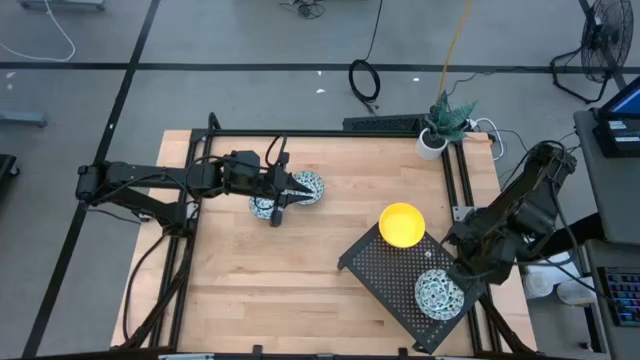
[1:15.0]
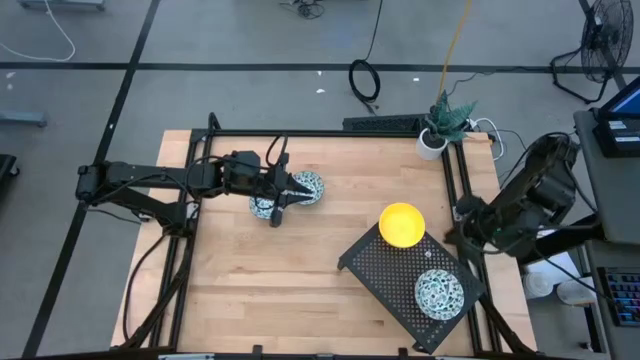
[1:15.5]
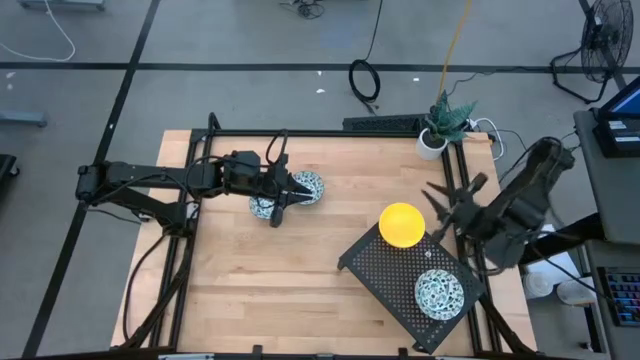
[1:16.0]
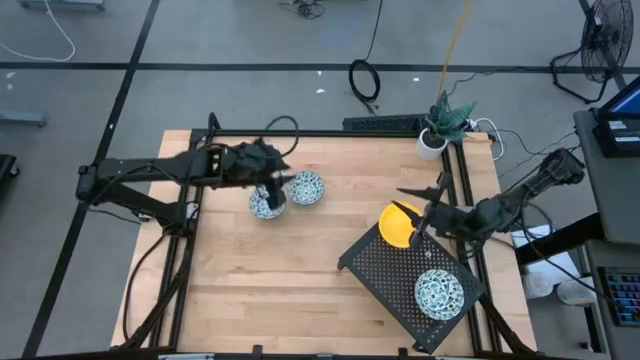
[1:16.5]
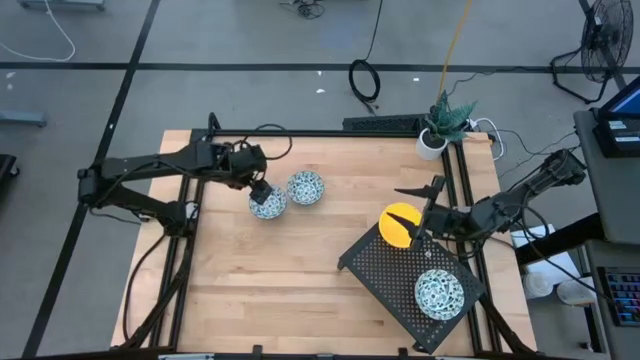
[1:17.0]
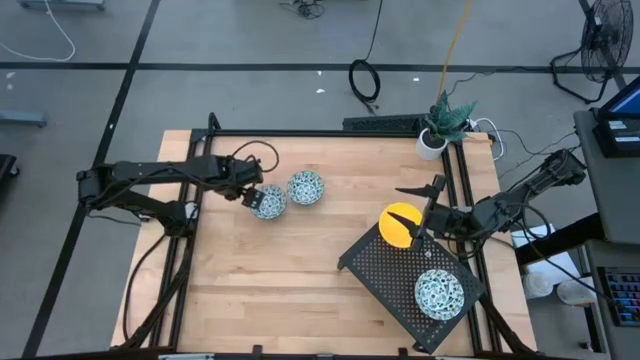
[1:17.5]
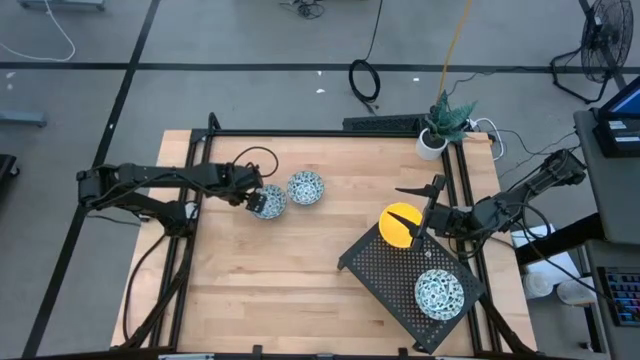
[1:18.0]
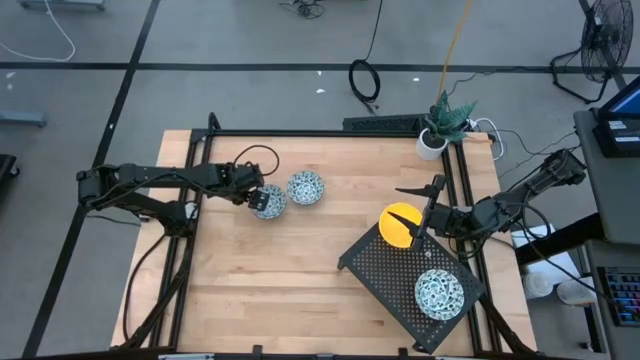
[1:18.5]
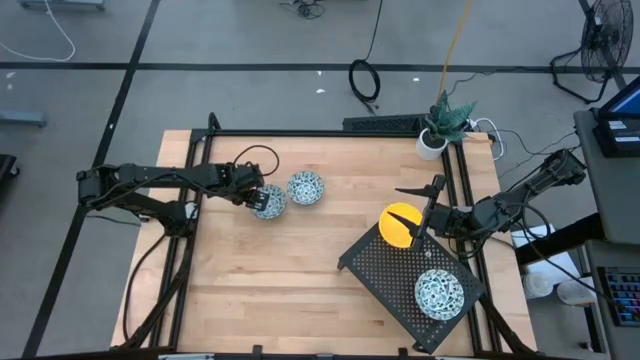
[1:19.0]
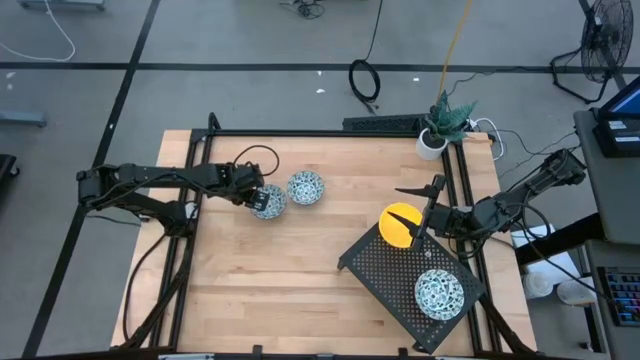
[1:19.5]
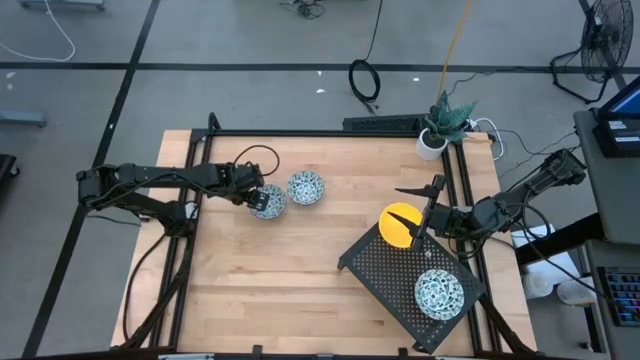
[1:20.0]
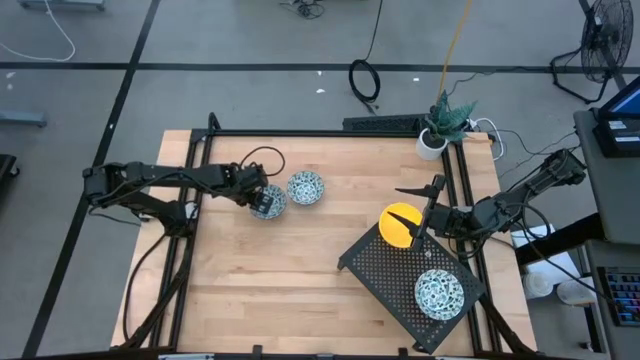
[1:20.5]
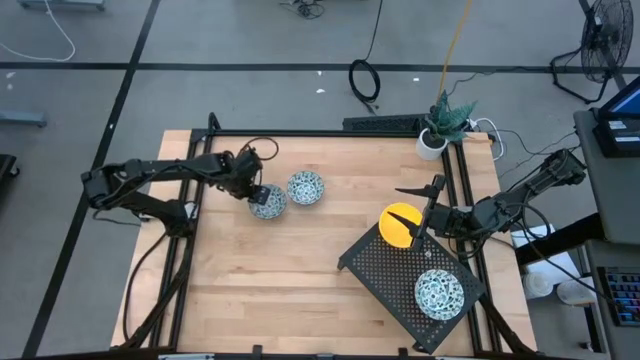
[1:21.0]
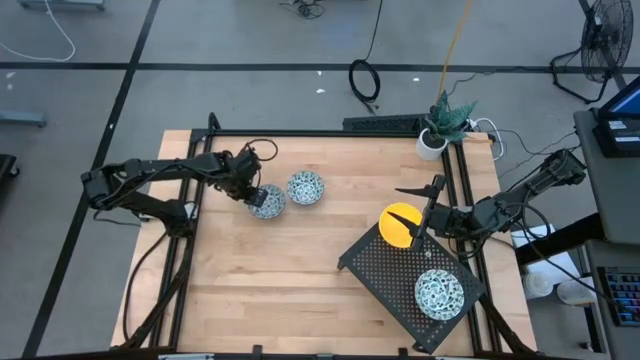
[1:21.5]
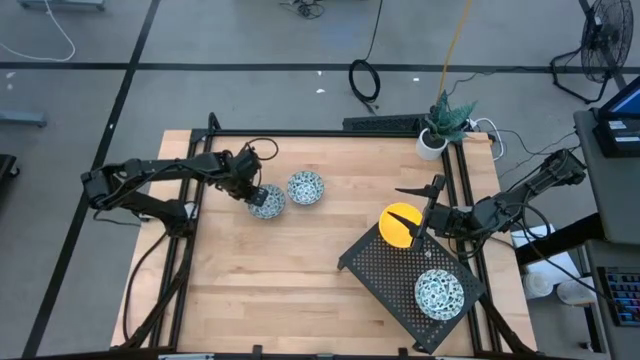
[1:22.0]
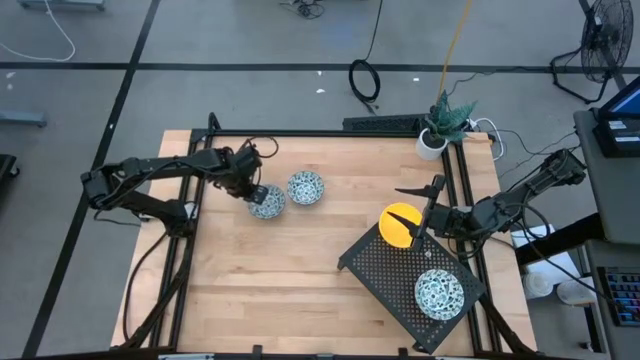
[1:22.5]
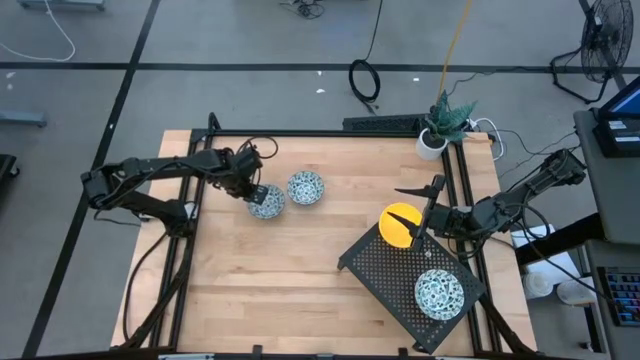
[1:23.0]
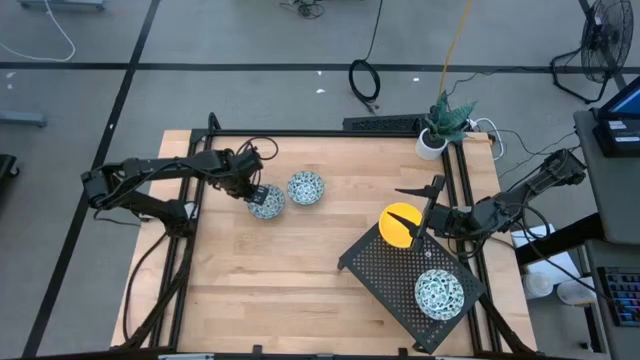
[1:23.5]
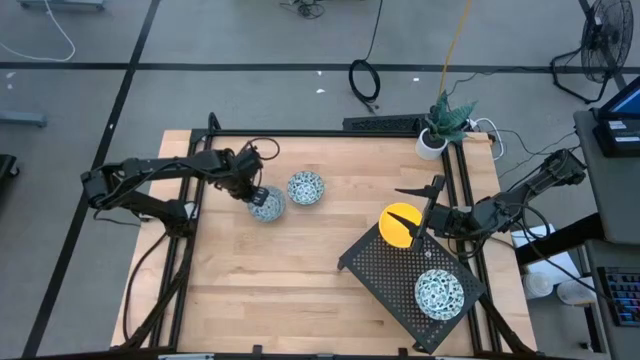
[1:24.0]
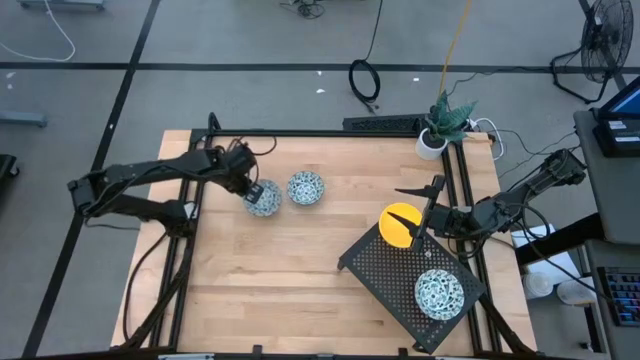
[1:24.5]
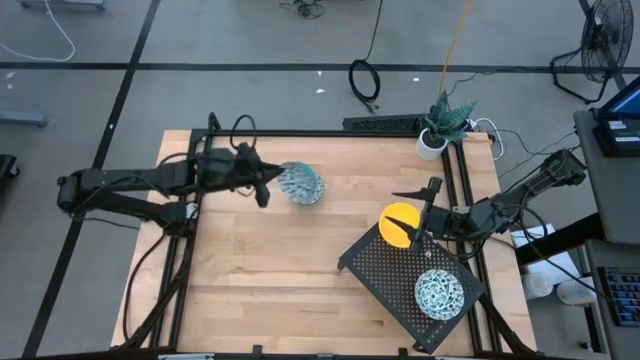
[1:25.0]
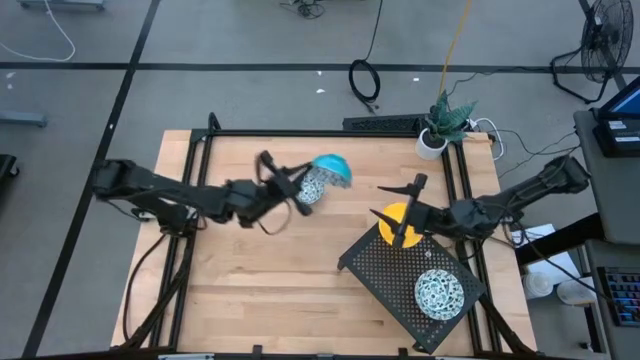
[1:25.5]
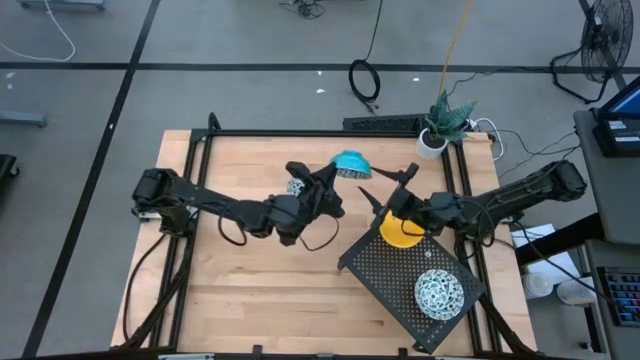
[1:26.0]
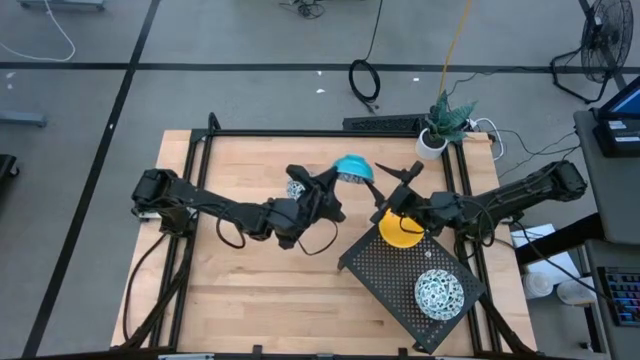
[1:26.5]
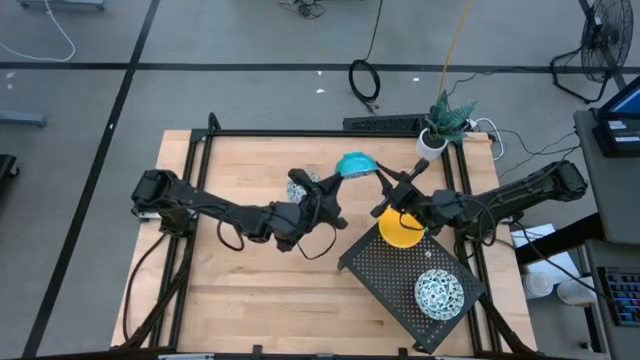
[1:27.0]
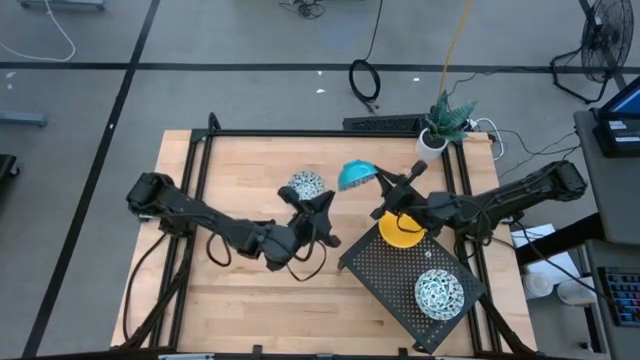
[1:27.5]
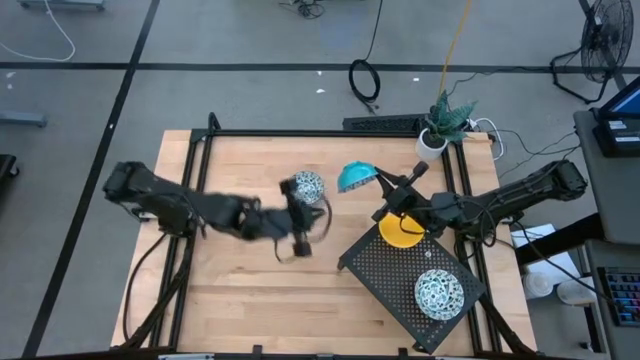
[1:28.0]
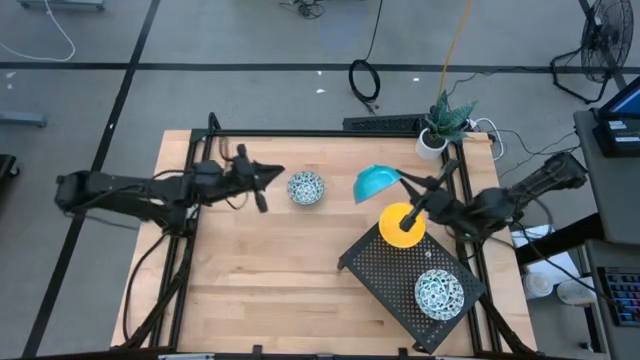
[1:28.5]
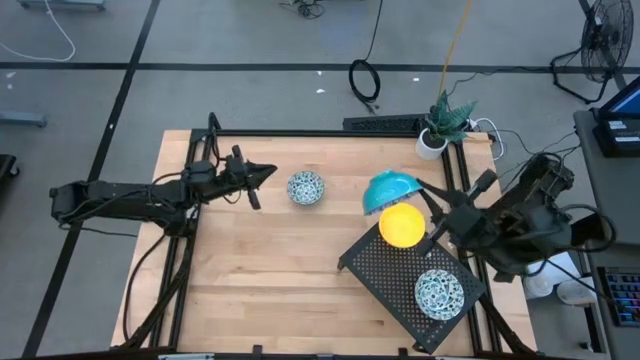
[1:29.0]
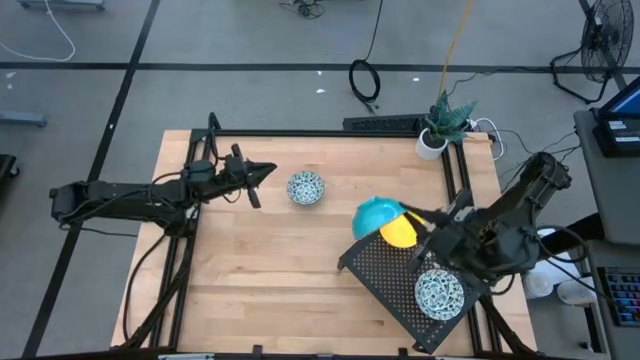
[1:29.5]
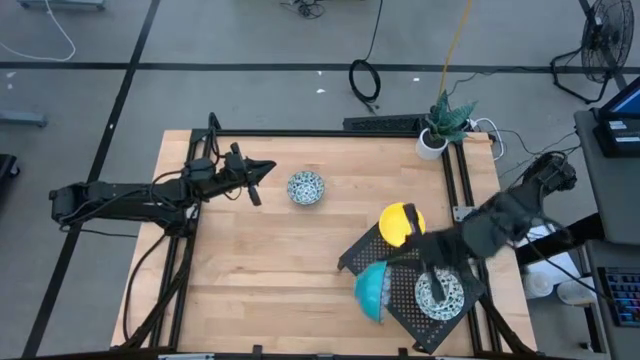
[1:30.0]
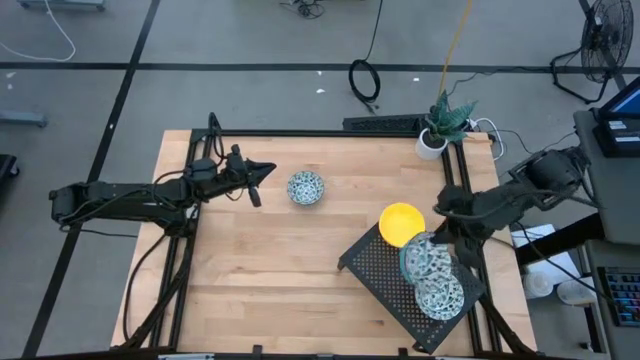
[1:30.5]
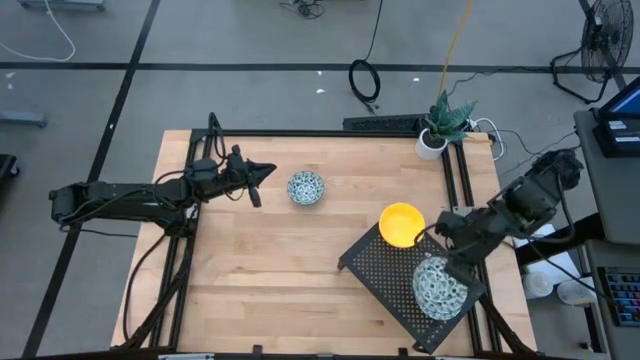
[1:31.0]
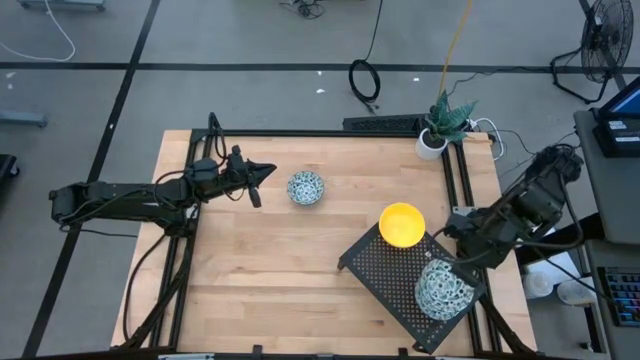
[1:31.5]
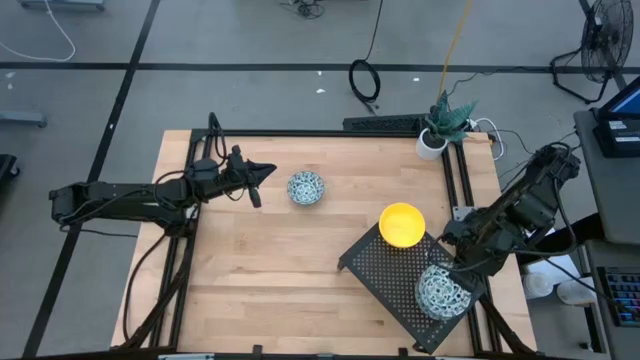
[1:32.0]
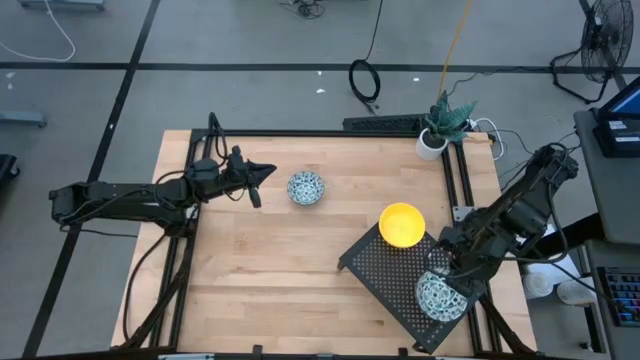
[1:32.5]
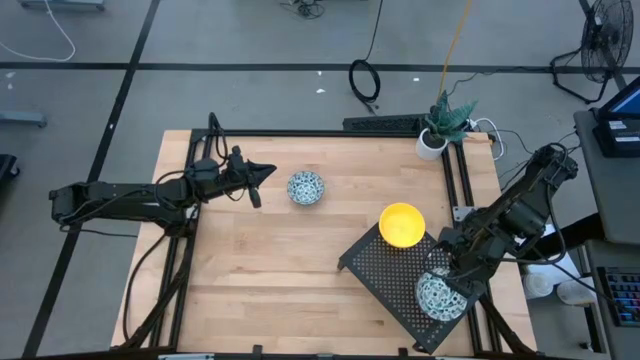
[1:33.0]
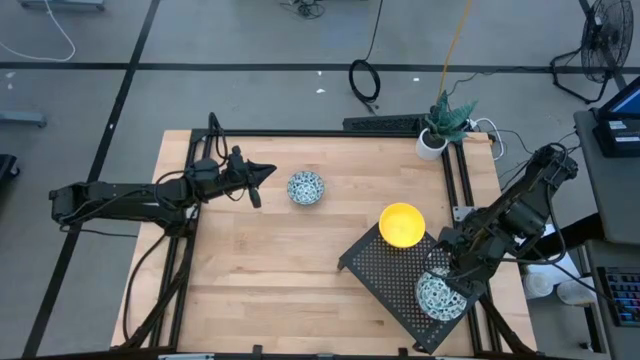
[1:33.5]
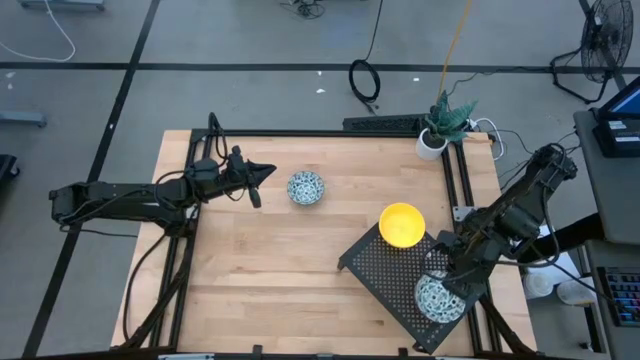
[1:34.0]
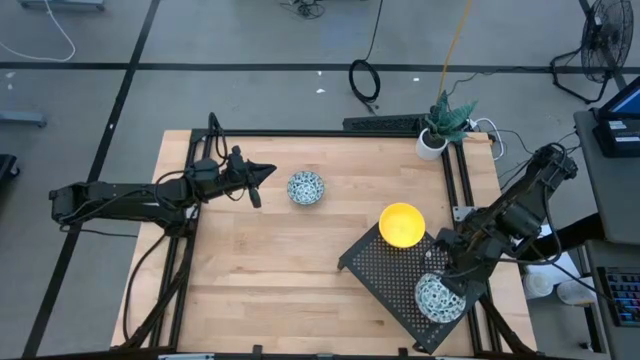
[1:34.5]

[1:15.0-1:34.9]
Task: Pick & Place Mini bowls
Stack the left blue patterned bowl on top of the blue patterned bowl on the shelf
